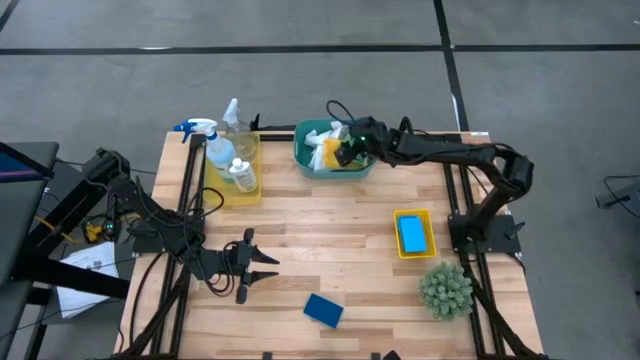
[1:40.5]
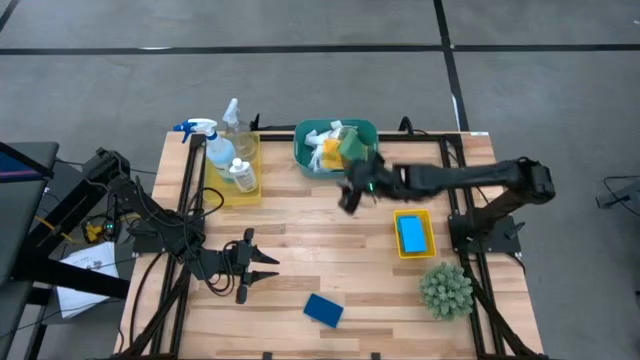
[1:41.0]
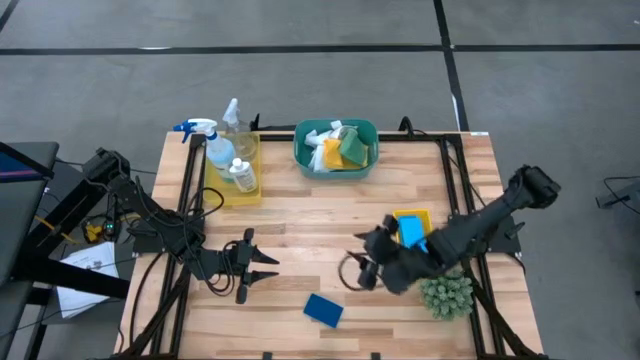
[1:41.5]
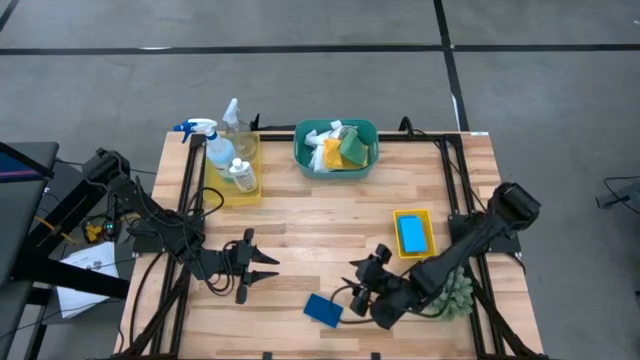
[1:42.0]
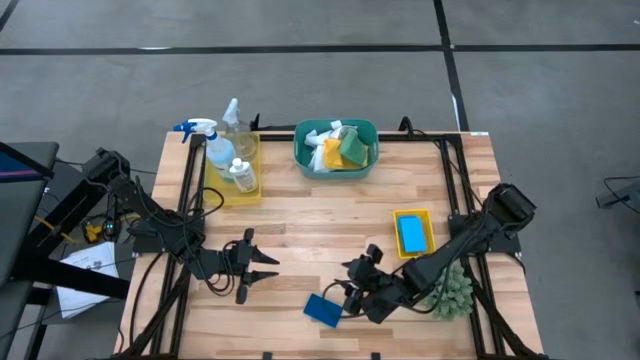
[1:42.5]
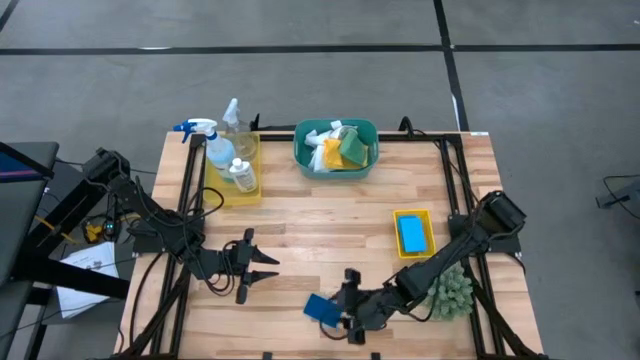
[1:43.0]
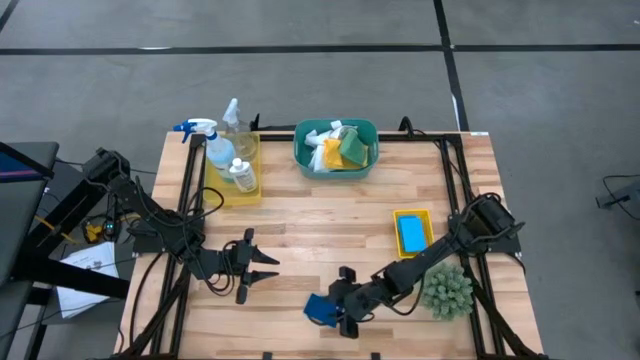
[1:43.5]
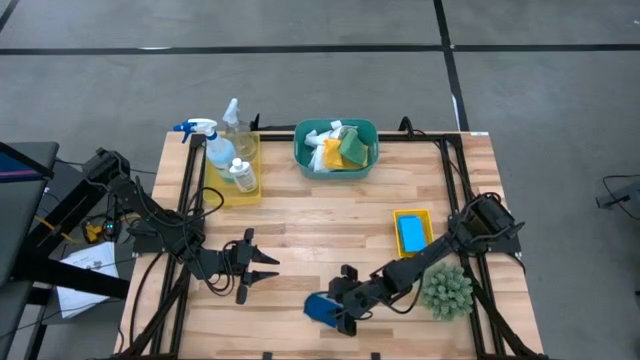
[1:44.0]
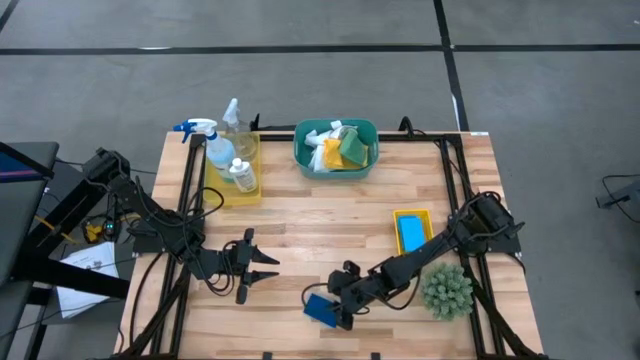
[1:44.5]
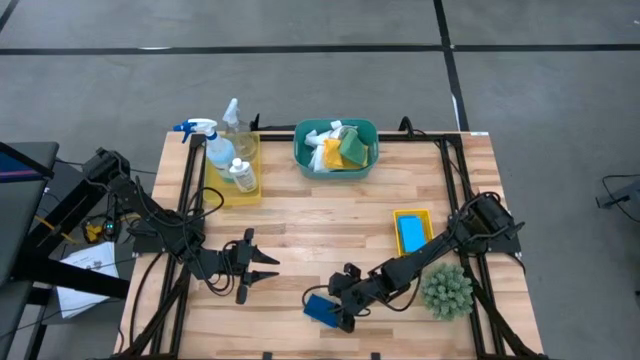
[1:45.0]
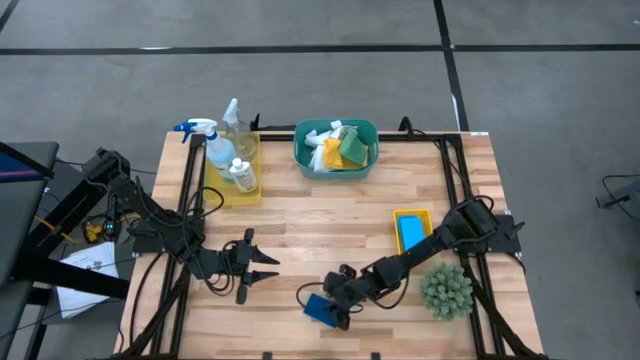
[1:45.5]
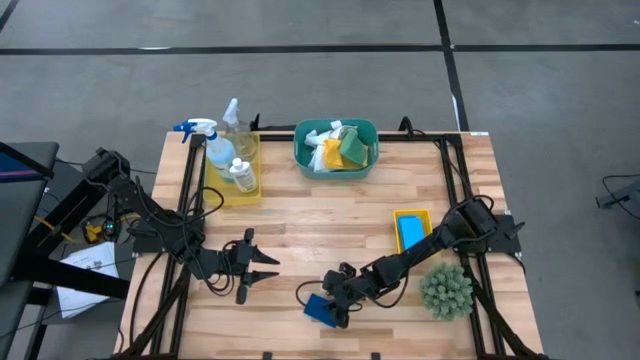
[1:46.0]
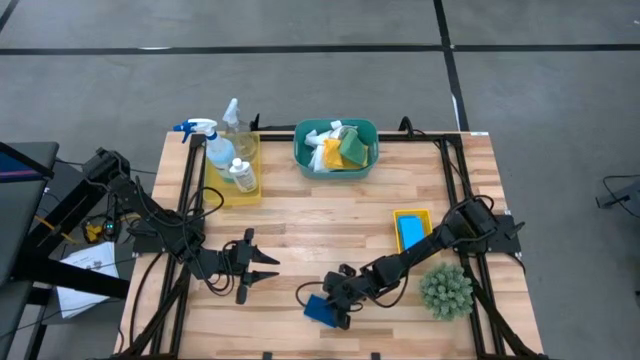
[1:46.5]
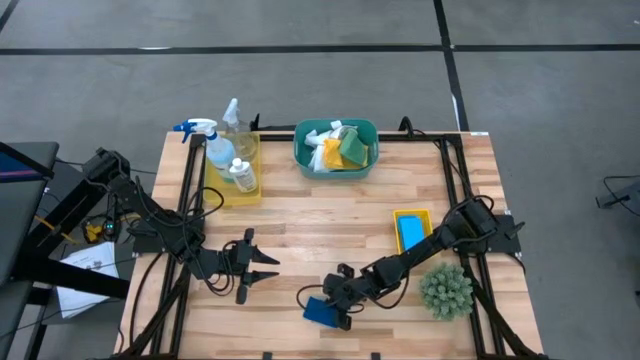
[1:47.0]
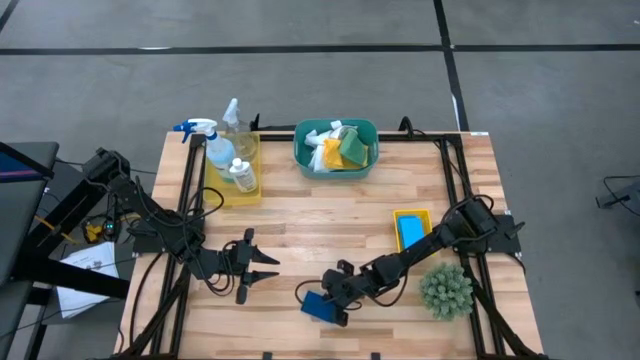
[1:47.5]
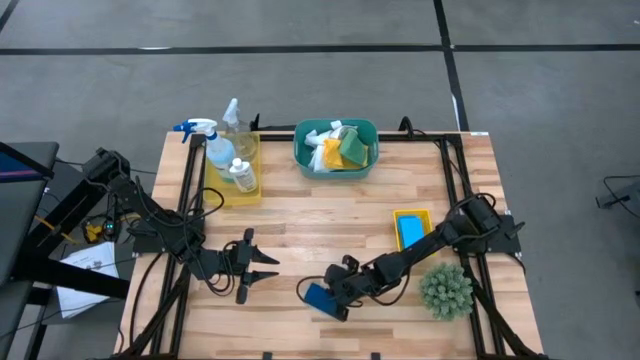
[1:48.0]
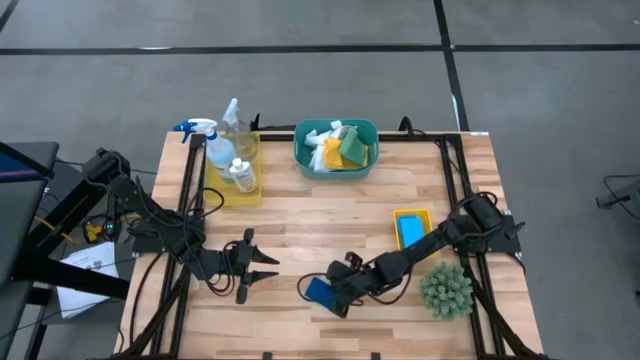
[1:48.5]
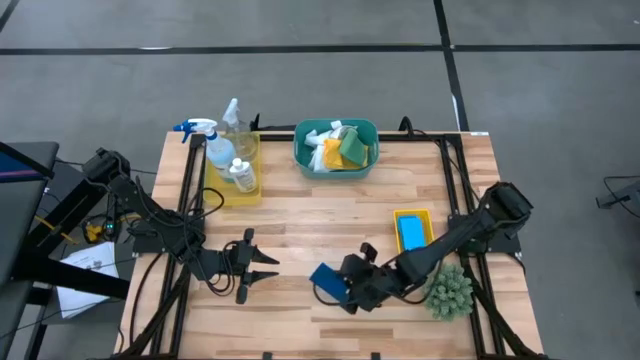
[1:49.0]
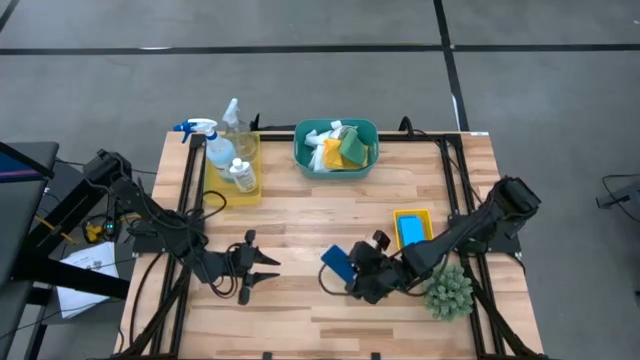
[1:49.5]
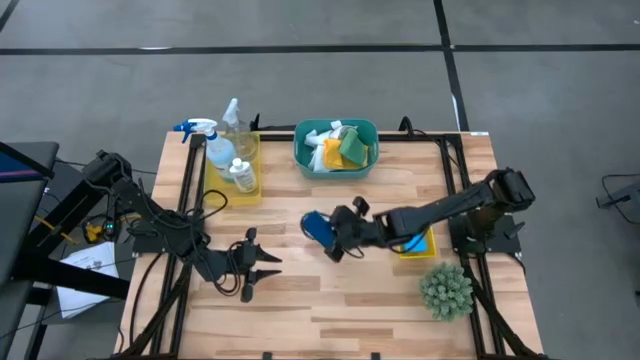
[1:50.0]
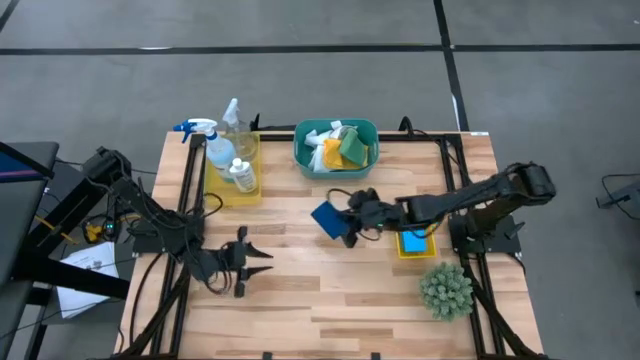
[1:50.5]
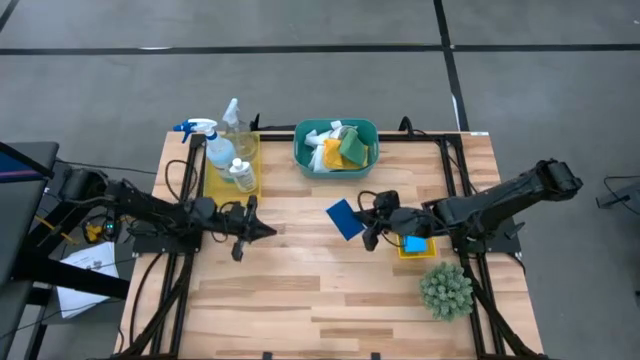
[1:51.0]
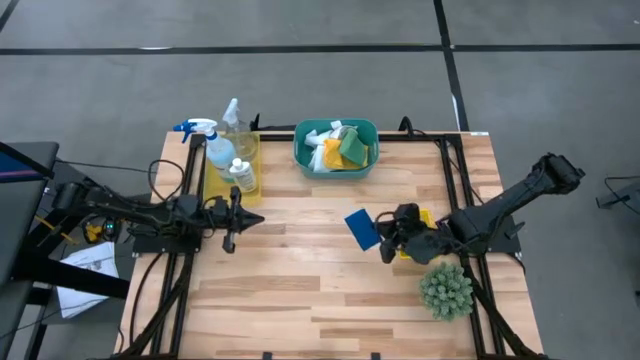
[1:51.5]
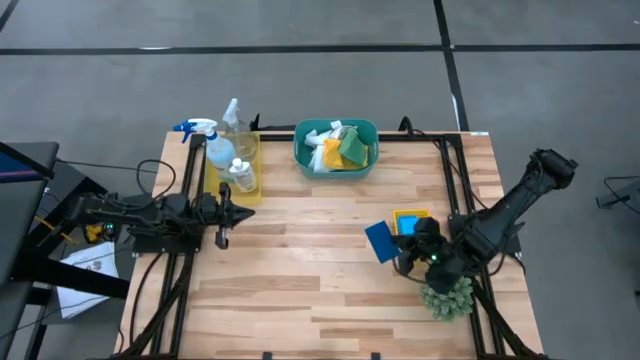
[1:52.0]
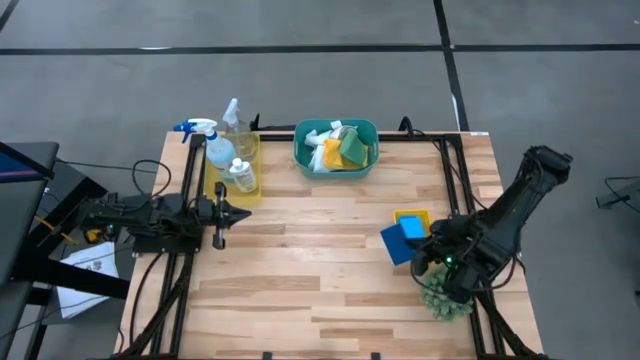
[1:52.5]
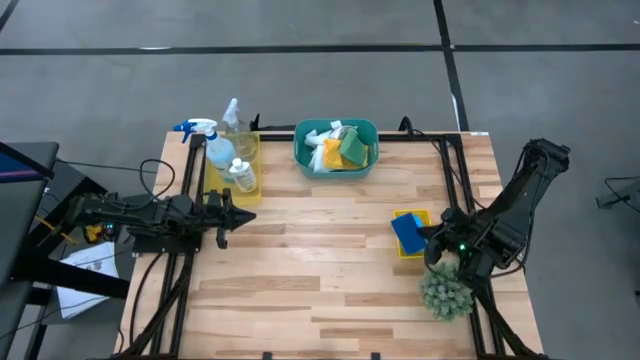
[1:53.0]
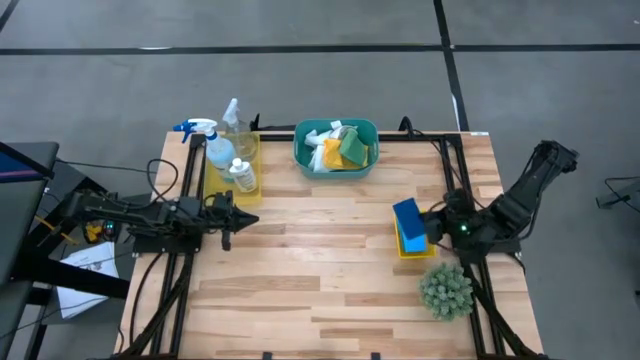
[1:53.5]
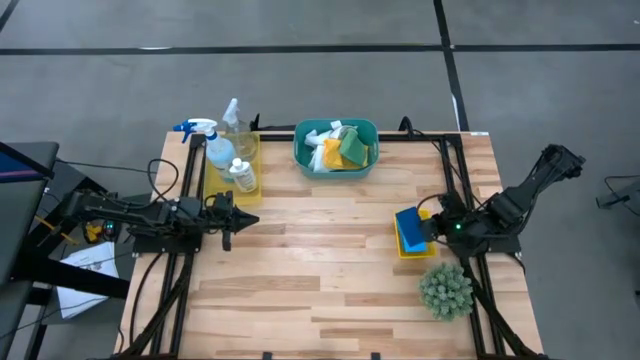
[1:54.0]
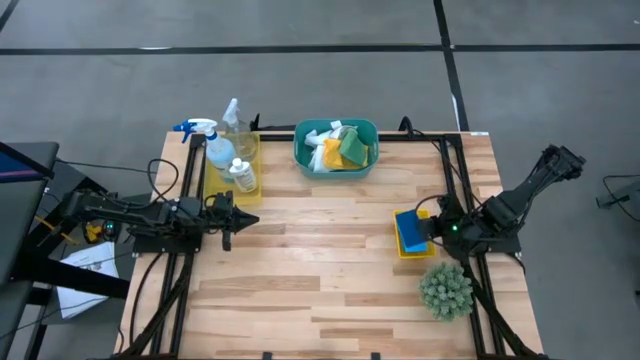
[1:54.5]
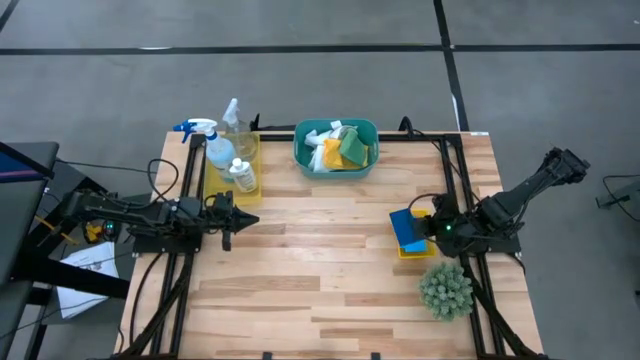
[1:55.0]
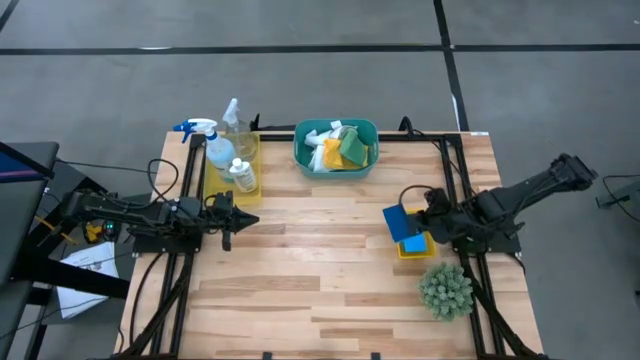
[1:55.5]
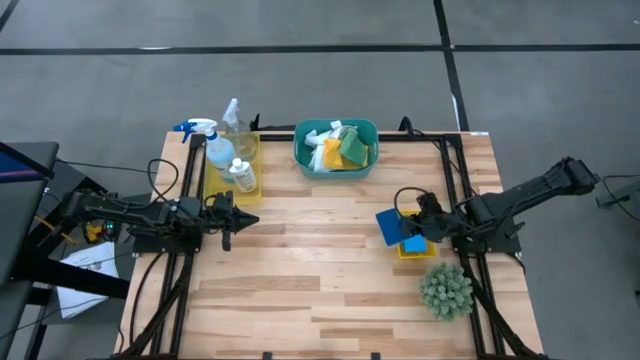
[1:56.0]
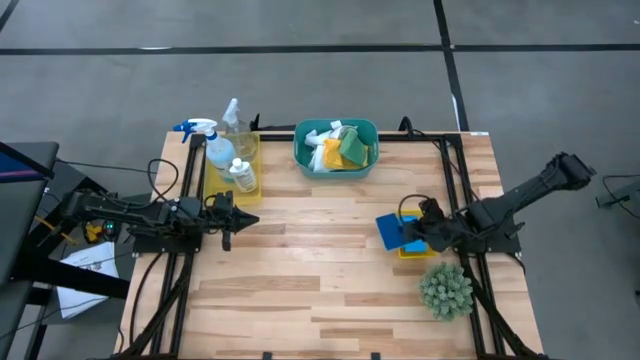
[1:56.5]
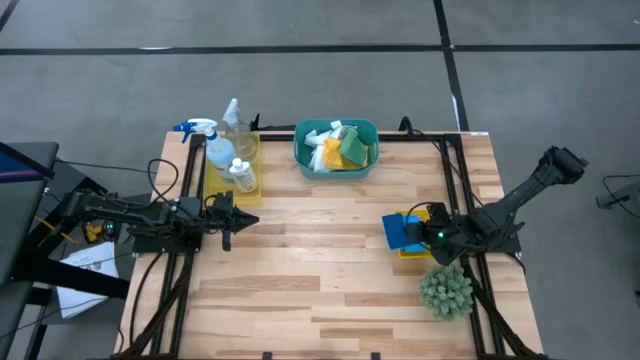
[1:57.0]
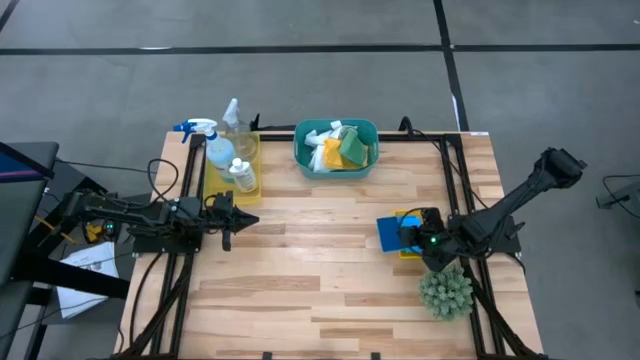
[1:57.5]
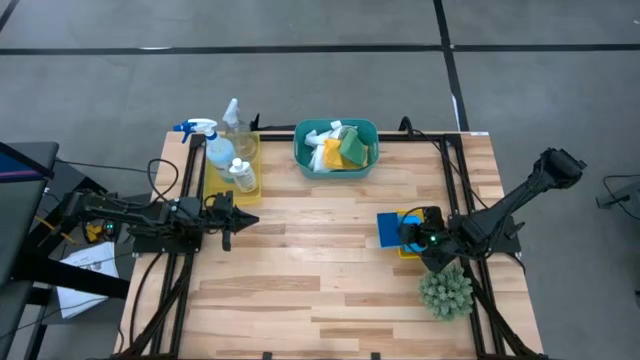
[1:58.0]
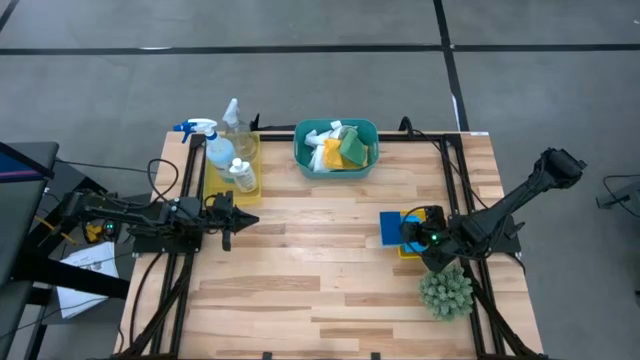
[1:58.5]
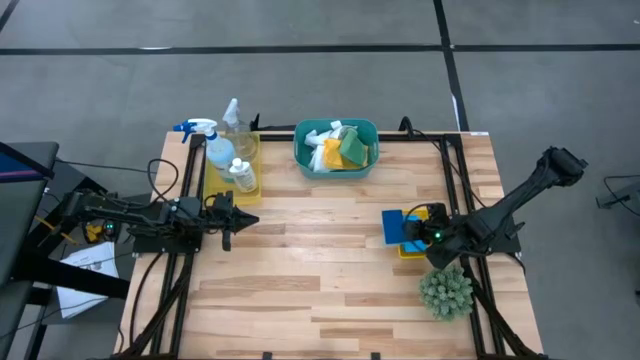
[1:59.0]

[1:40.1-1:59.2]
Task: Pick & Place Kitchen Items
Put the blue sponge into the right yellow bin

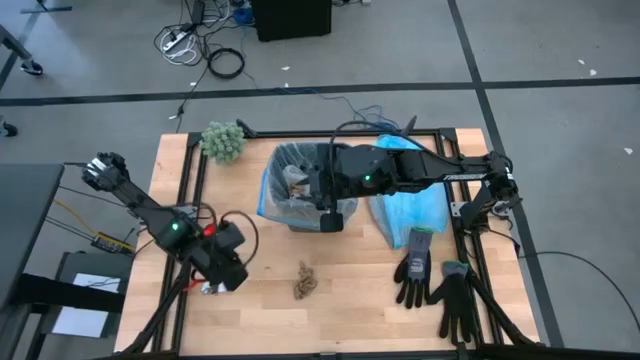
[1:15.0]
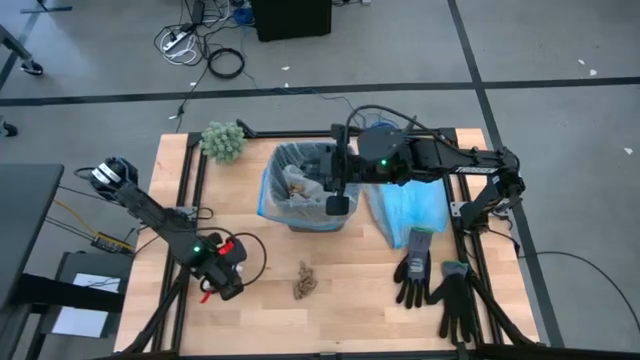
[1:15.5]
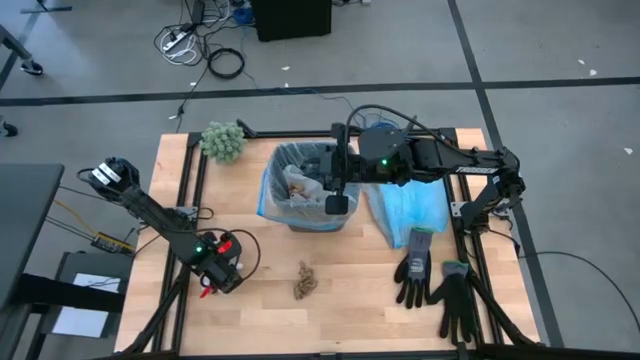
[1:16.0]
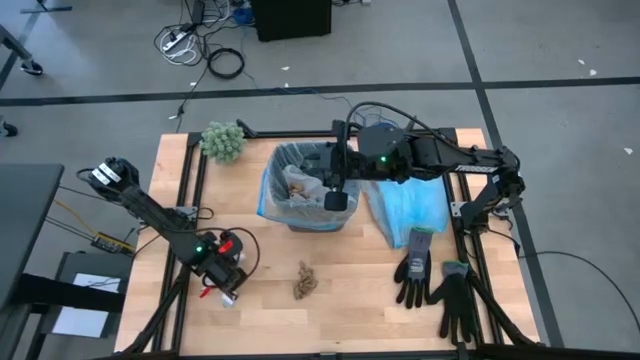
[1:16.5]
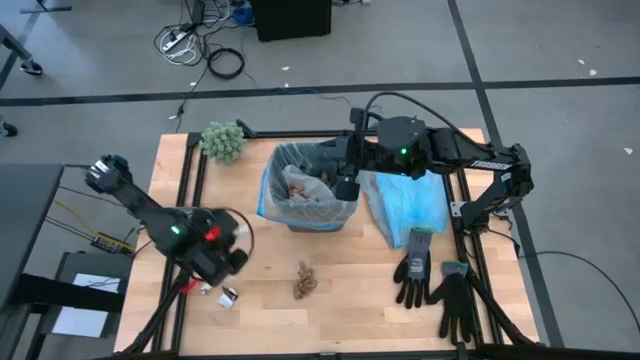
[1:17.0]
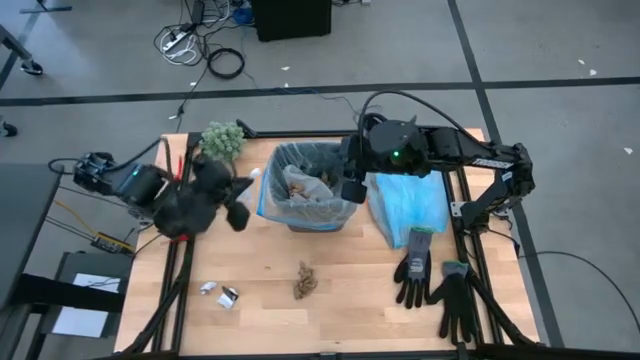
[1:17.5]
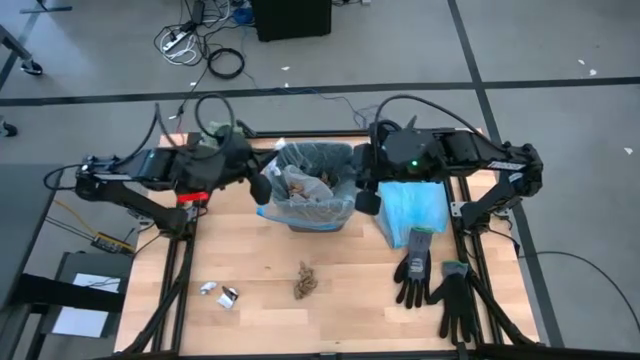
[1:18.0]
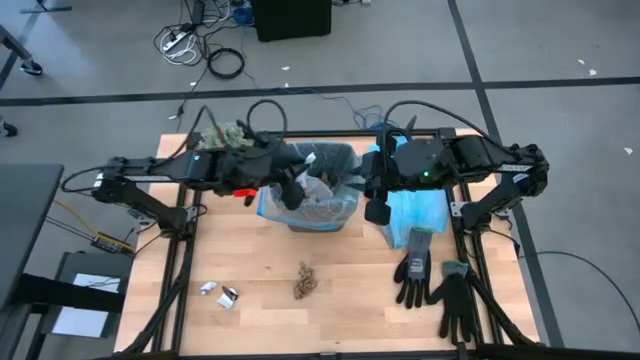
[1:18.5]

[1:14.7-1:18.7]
Task: place trash/remove bag and relplace
Put the white paper into the trash bin
